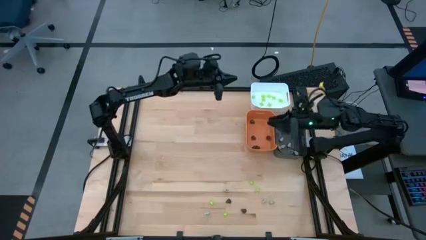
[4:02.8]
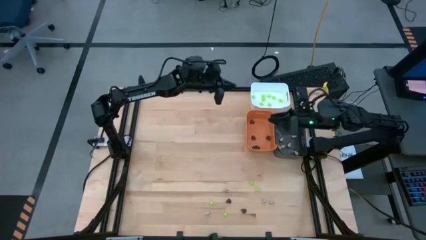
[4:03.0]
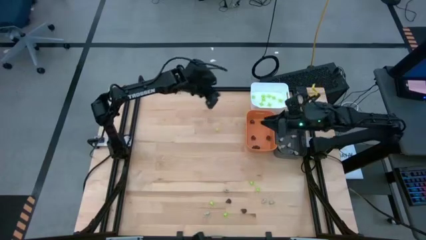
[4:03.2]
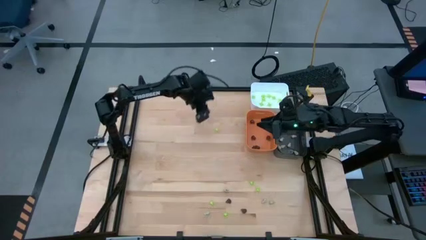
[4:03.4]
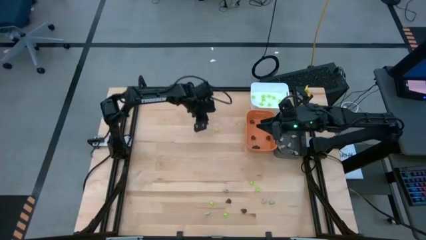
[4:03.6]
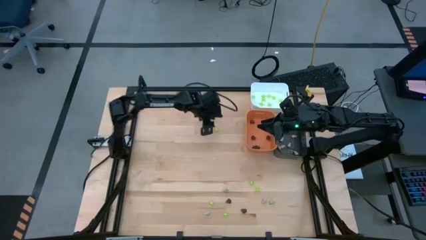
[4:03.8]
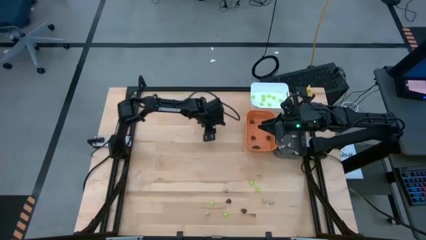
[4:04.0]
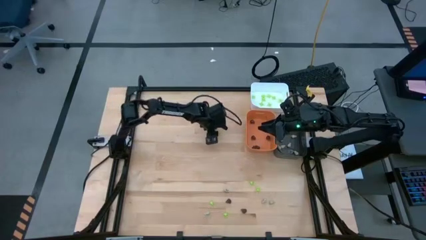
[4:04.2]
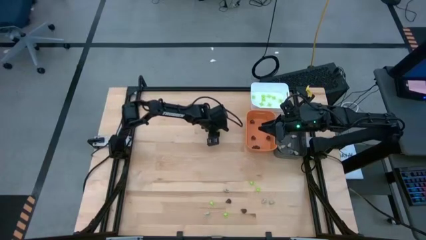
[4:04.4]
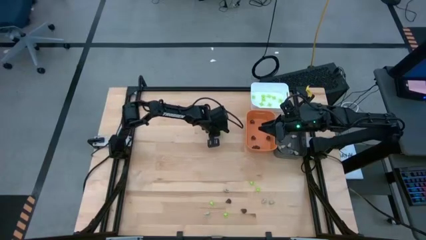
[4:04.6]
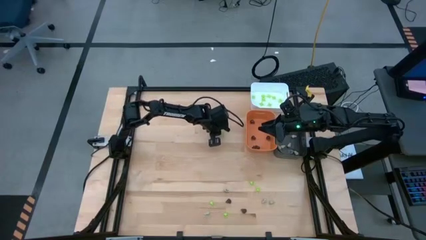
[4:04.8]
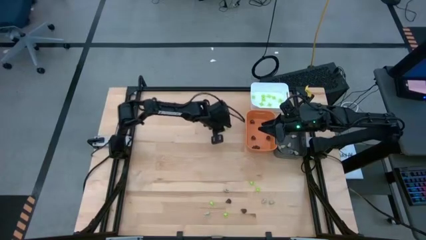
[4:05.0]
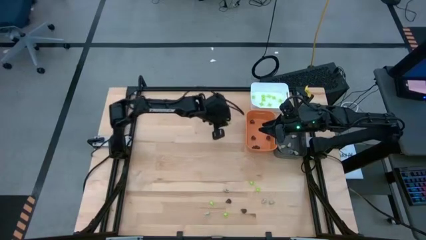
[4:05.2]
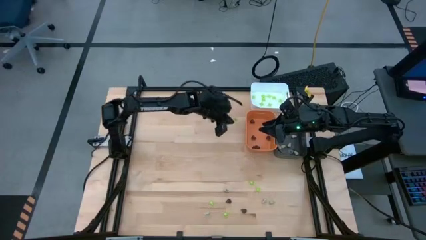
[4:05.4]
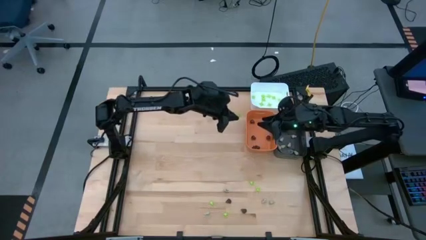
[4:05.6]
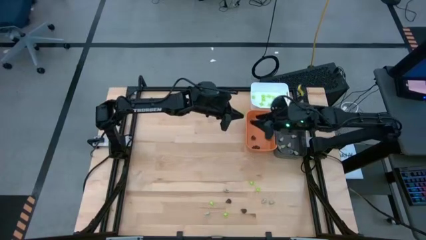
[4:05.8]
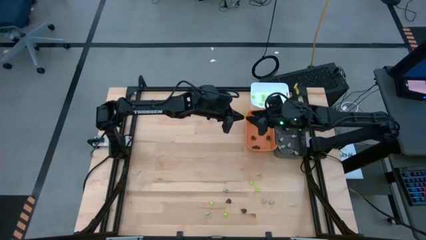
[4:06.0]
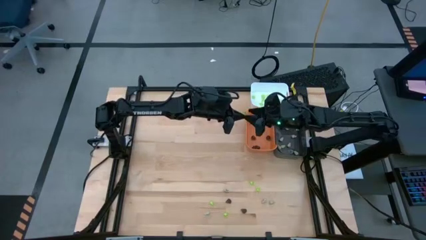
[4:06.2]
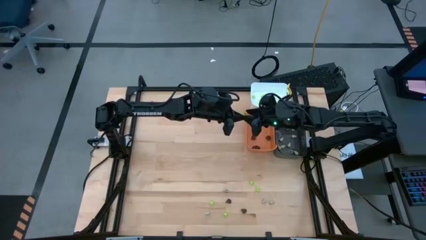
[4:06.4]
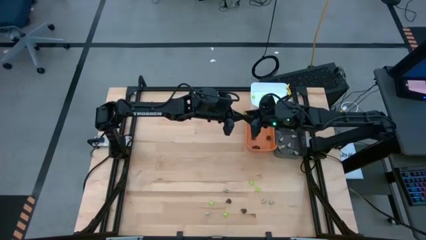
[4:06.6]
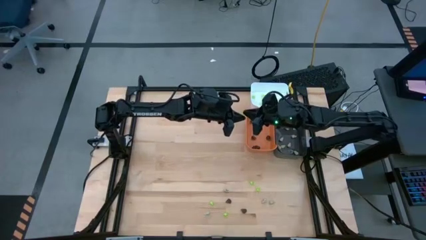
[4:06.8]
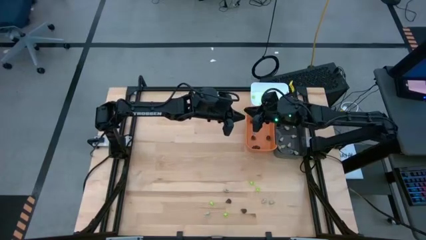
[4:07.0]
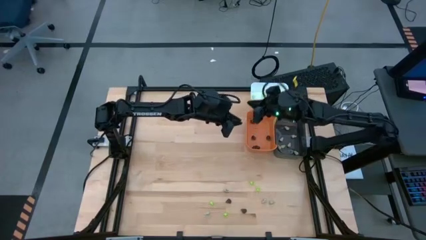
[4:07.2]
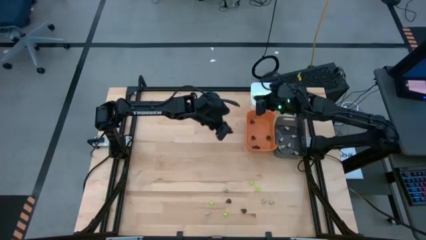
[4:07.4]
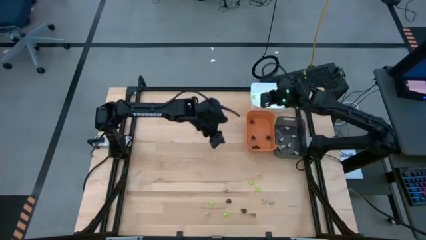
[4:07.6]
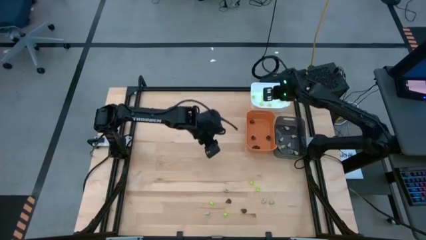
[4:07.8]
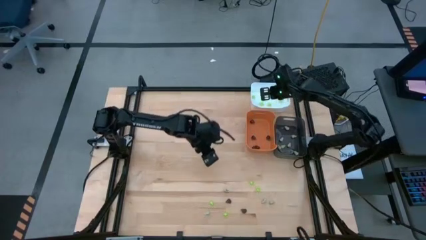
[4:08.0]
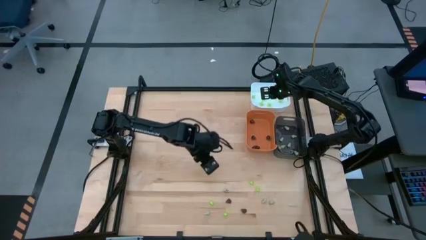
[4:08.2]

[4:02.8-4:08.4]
Task: Sort Halloween decoration
Put the green spider toy into the white bin

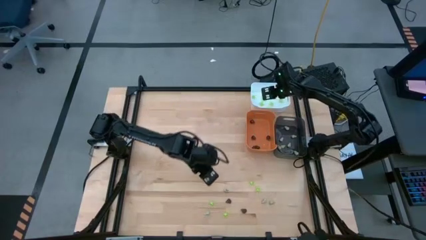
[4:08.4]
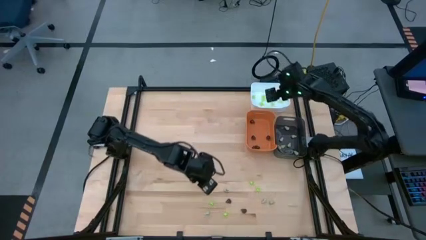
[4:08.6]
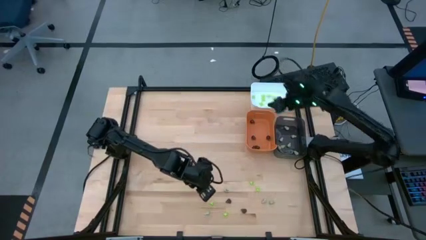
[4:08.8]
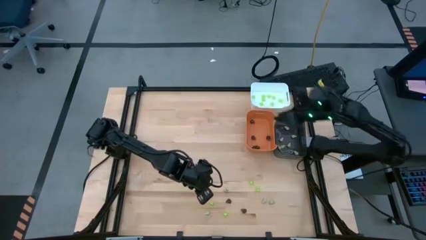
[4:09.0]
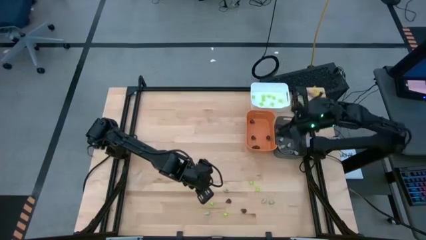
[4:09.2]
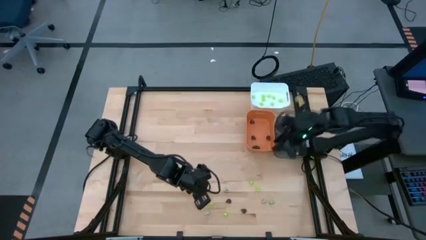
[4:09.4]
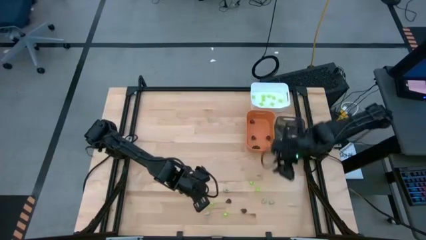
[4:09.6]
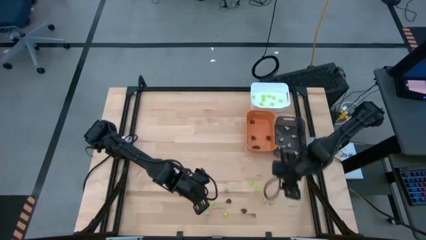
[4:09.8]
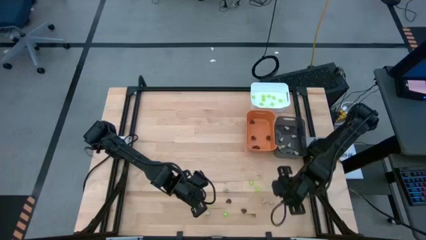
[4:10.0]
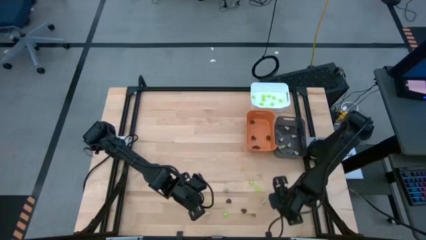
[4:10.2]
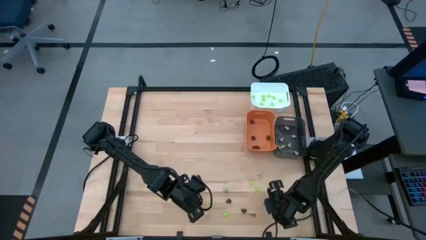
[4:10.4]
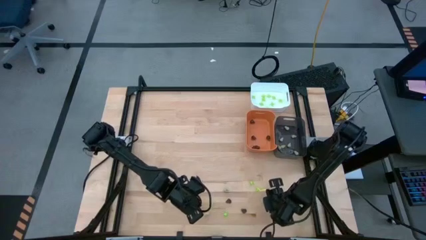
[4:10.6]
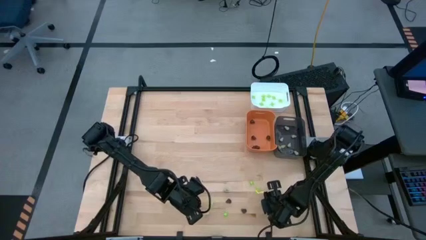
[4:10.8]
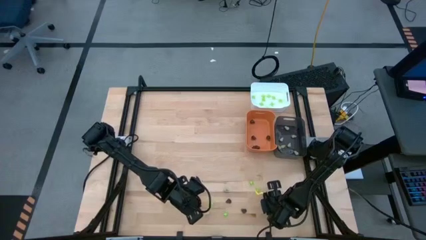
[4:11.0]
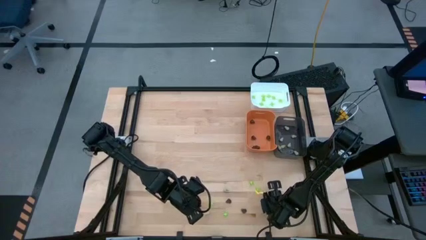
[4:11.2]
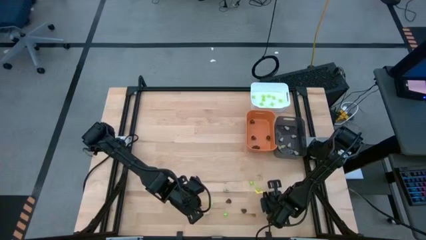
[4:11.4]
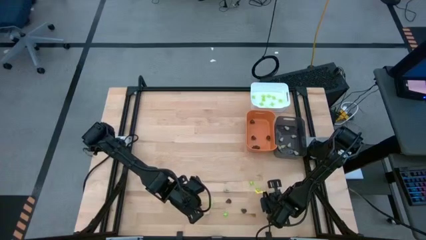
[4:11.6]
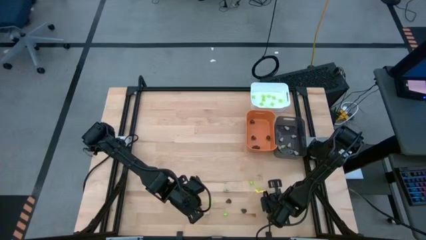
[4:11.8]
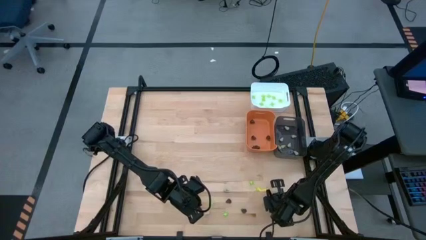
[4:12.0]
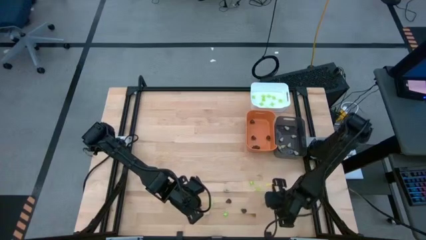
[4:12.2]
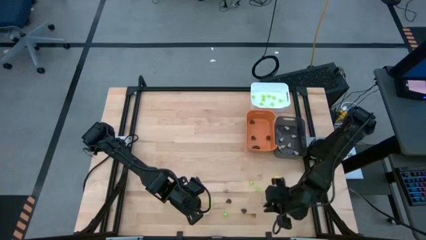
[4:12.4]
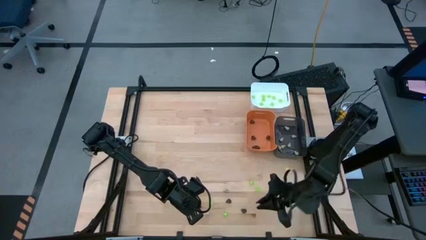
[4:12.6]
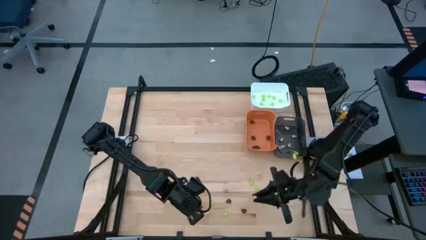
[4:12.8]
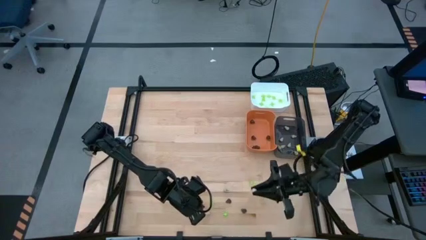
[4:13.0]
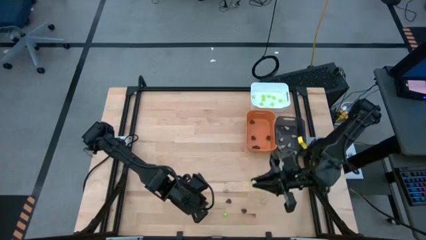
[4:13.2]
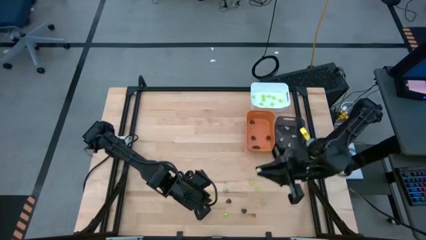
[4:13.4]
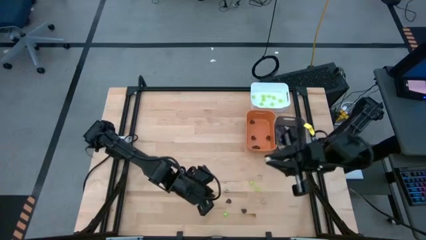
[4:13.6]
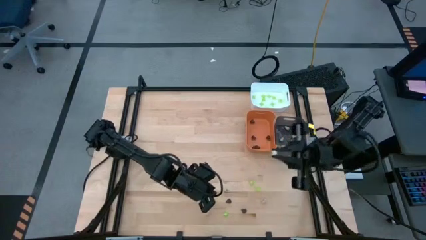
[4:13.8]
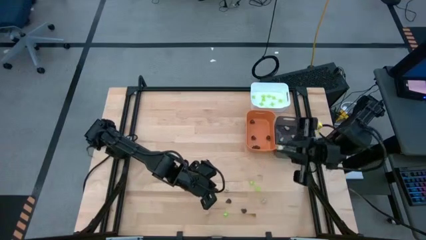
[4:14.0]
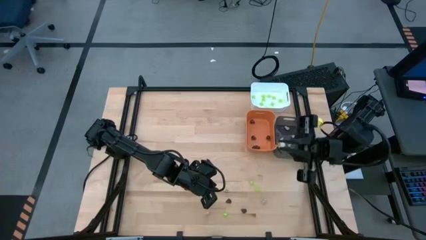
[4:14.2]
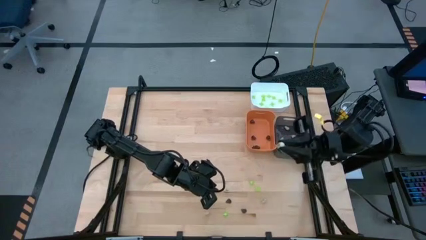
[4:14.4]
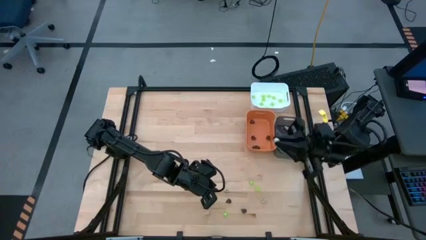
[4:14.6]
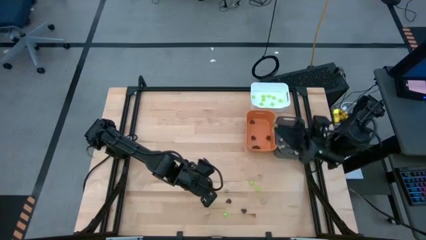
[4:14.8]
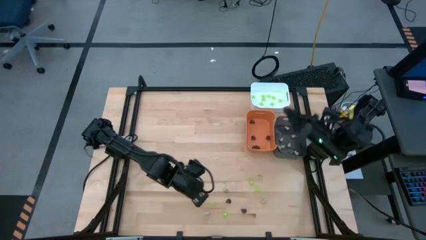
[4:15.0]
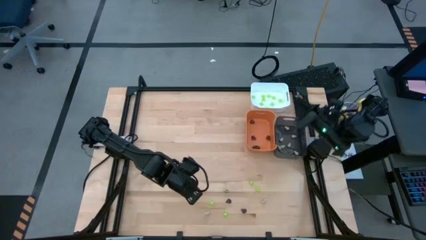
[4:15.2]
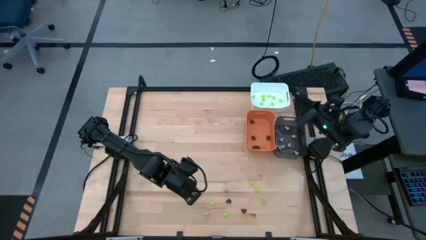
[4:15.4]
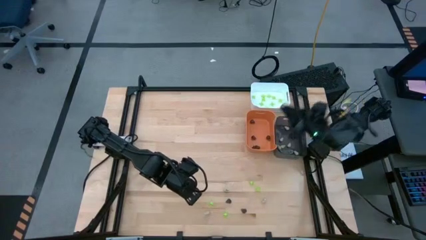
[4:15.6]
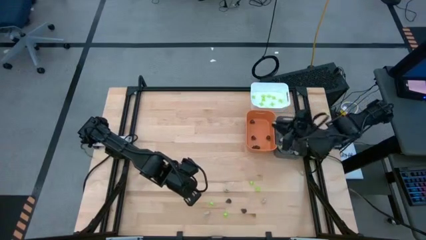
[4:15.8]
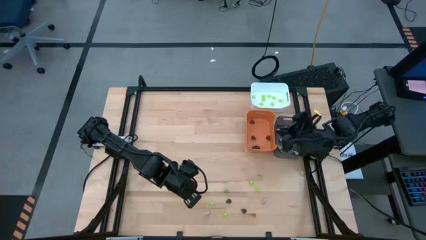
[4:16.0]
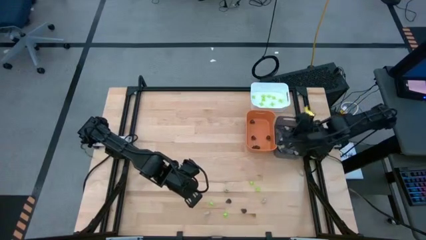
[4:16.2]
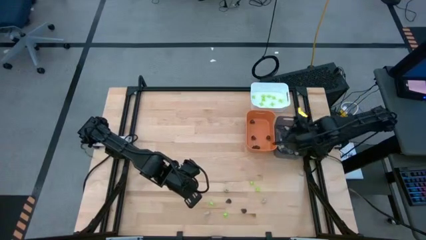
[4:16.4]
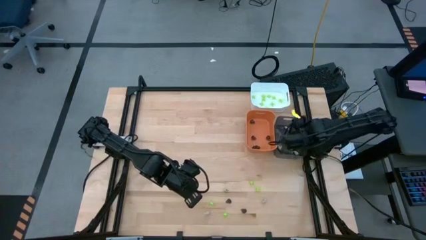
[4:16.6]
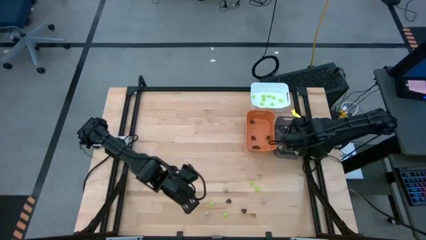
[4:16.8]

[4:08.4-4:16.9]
Put the white skull toy into the black bin
